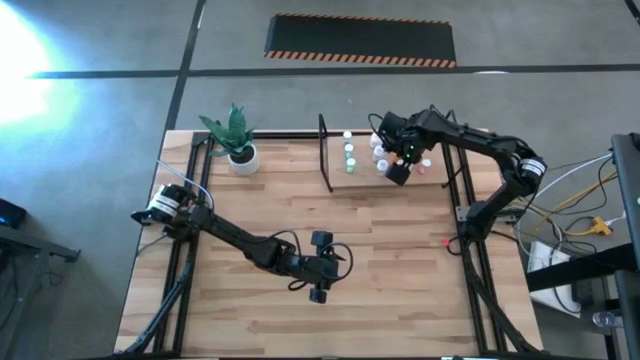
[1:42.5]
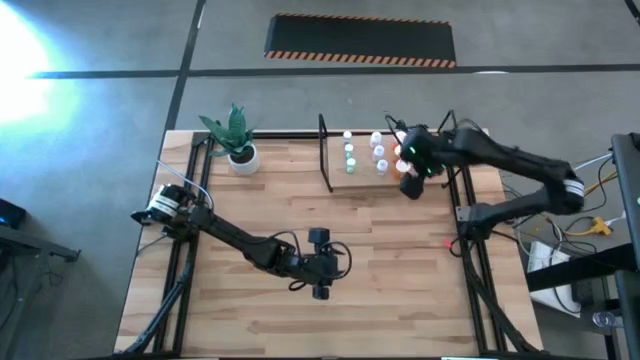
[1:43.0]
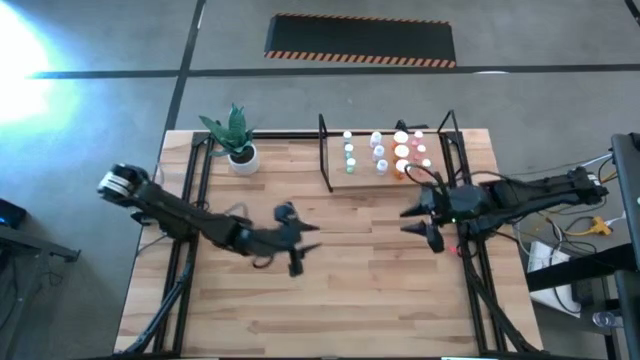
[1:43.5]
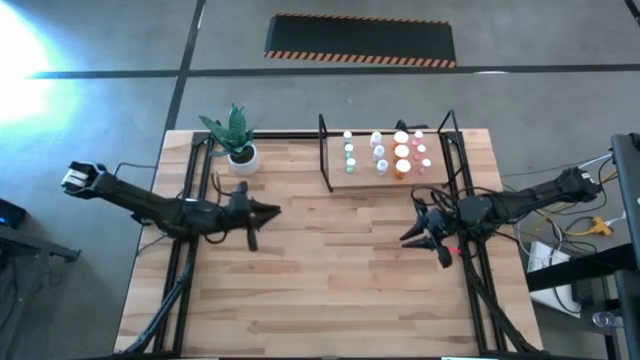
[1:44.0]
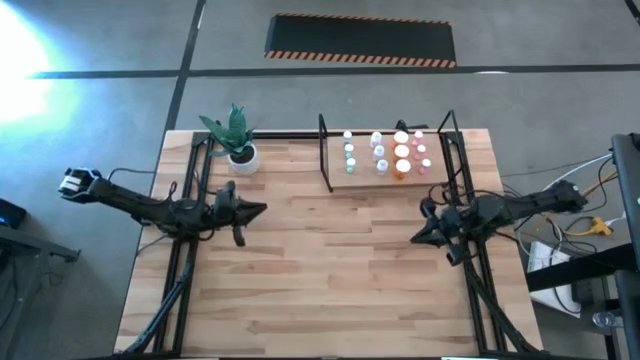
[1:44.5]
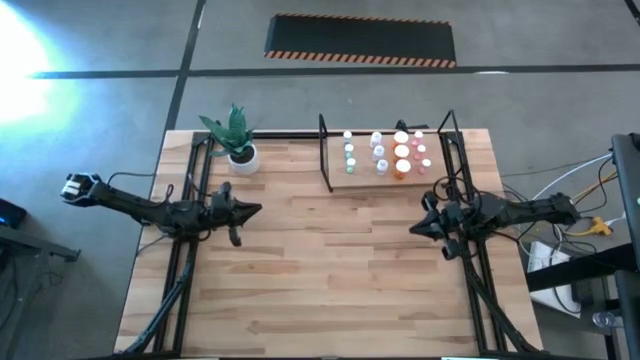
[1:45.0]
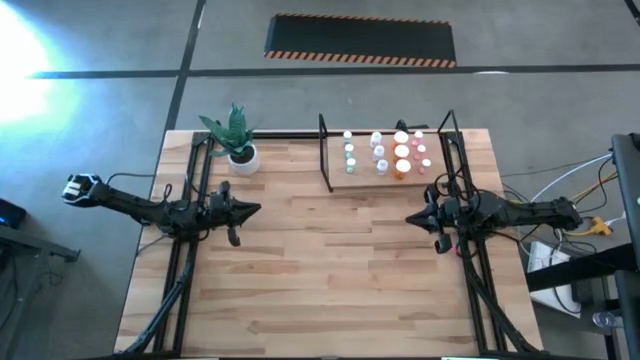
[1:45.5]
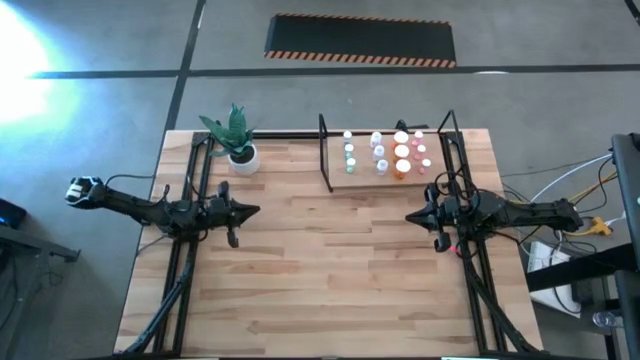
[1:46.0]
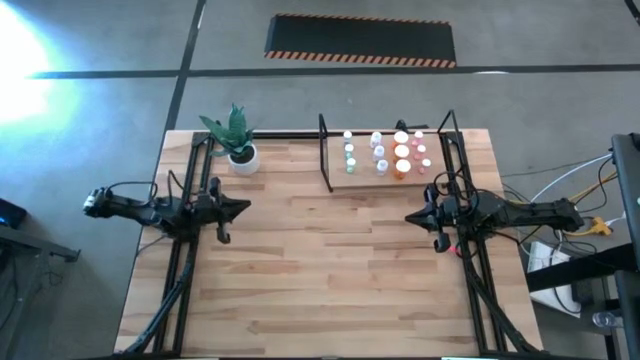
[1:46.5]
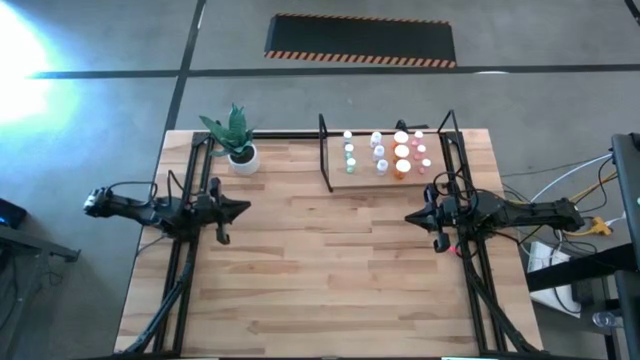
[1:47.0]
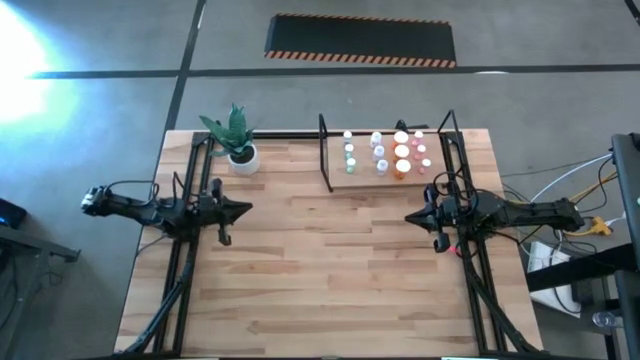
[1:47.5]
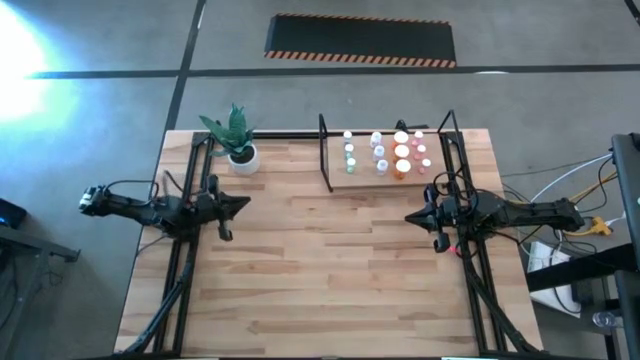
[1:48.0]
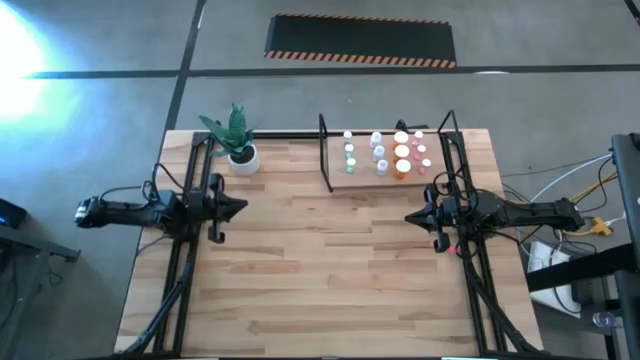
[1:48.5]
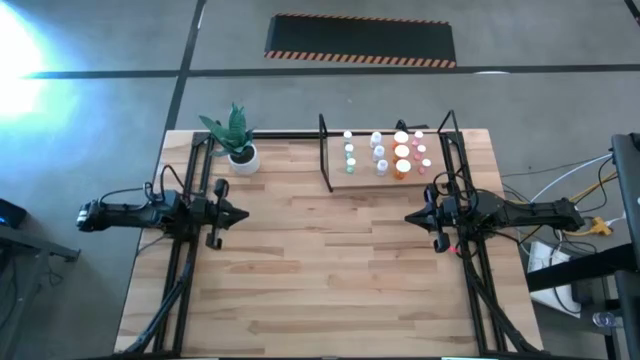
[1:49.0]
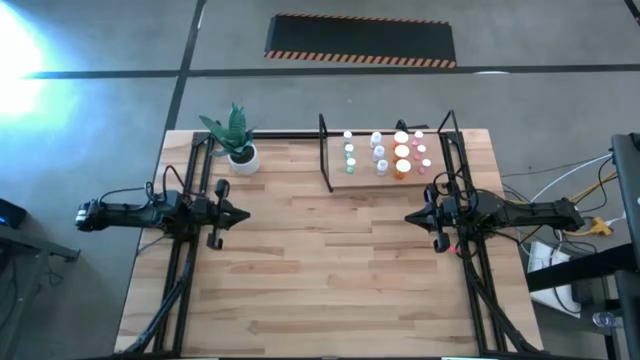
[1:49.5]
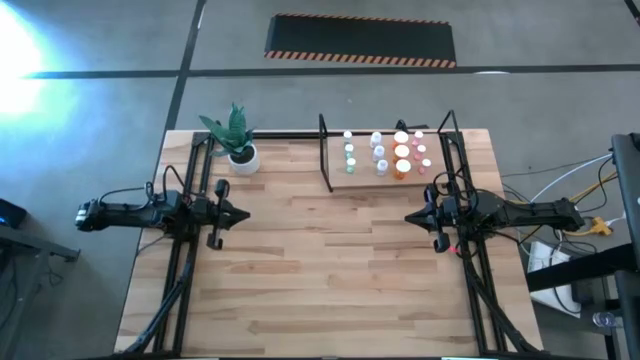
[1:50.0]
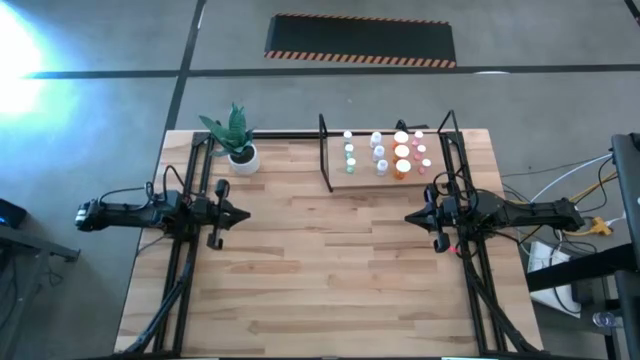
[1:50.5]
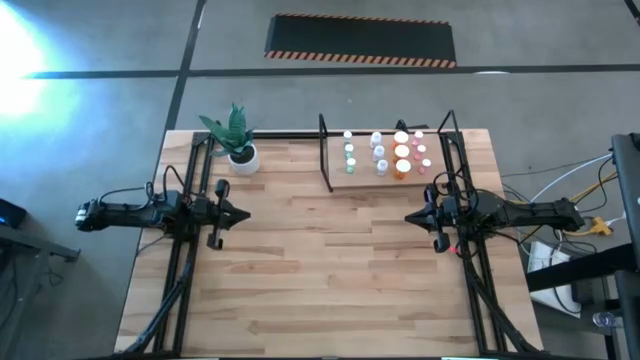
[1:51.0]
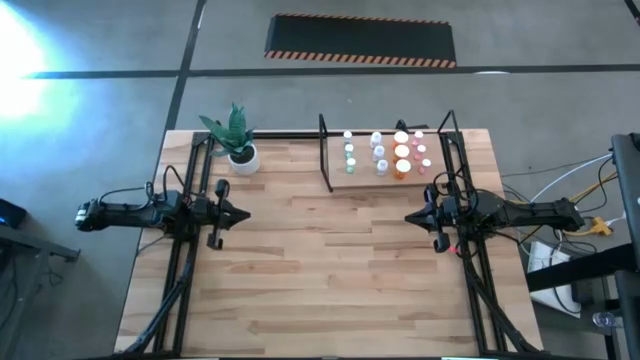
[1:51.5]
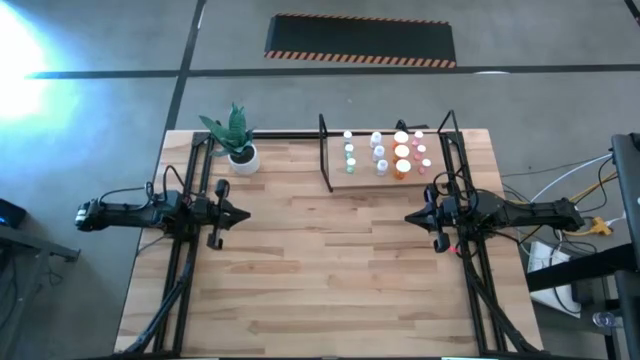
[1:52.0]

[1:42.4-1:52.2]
Task: Pick and place medicine bottles onto shelf by color
Return to Home Position

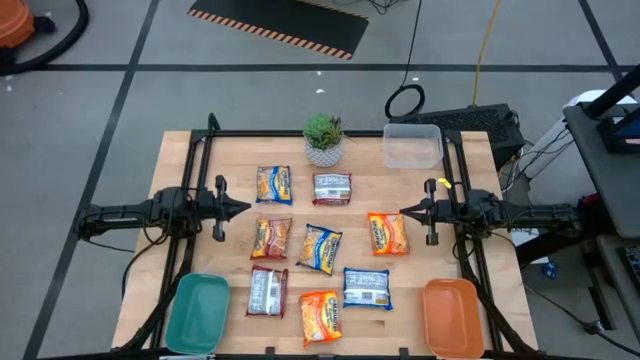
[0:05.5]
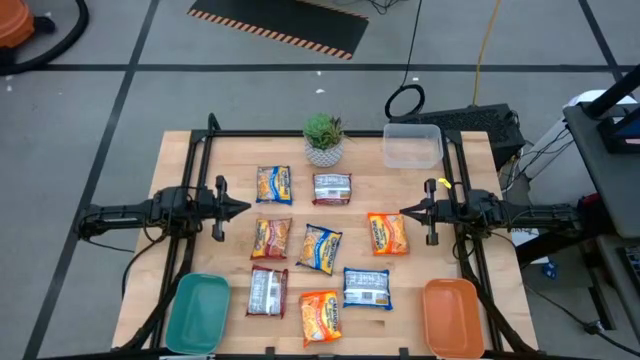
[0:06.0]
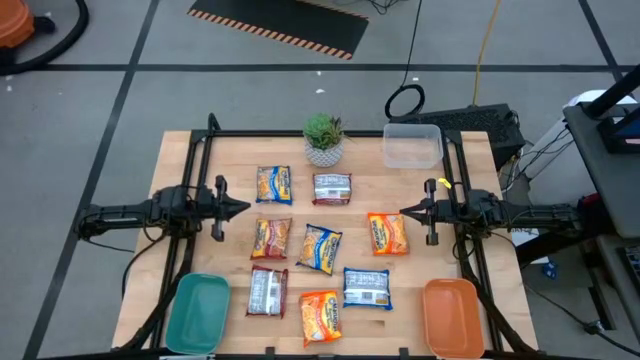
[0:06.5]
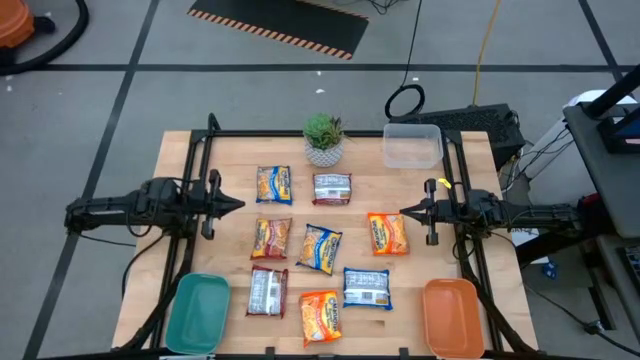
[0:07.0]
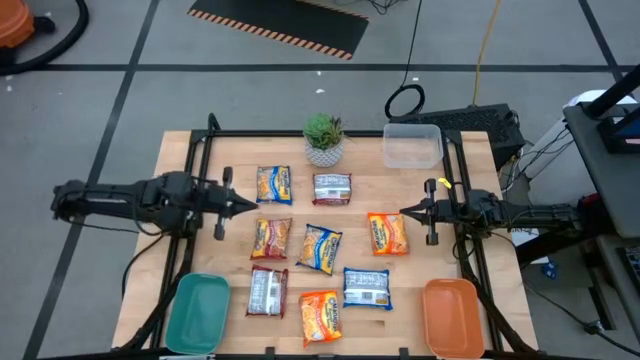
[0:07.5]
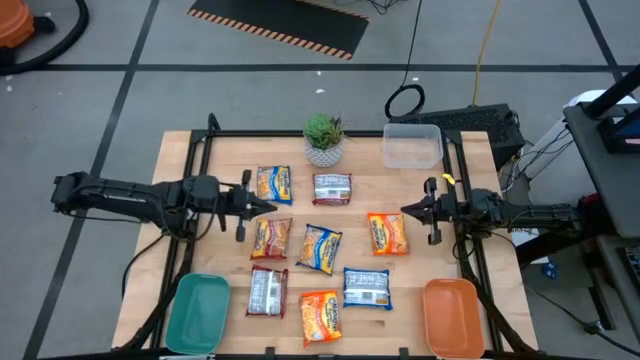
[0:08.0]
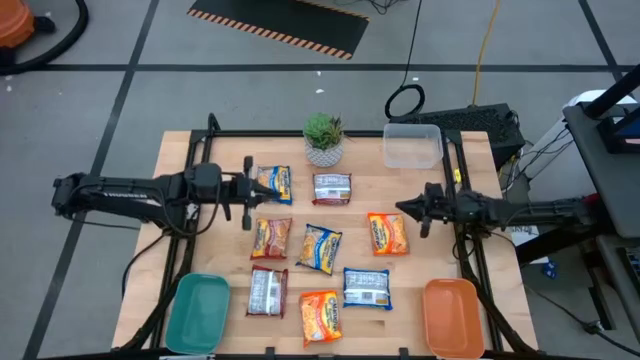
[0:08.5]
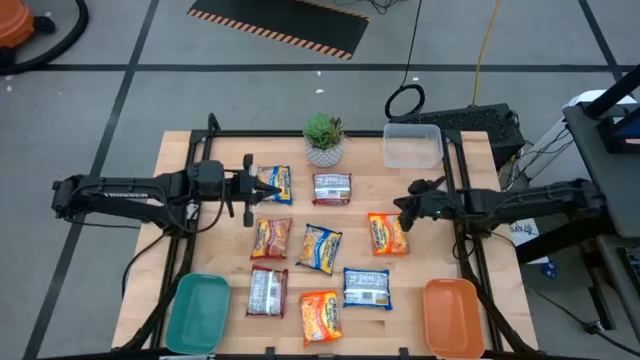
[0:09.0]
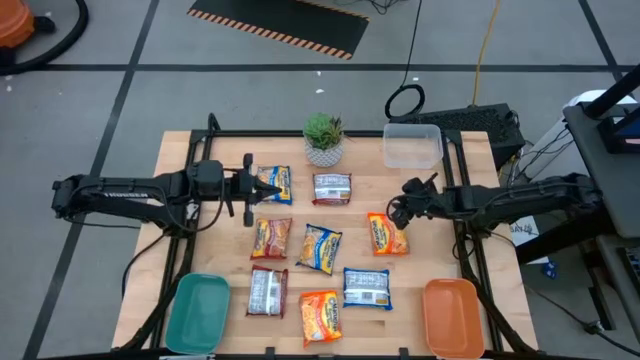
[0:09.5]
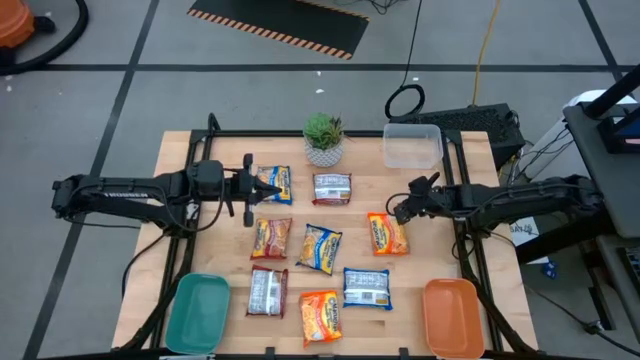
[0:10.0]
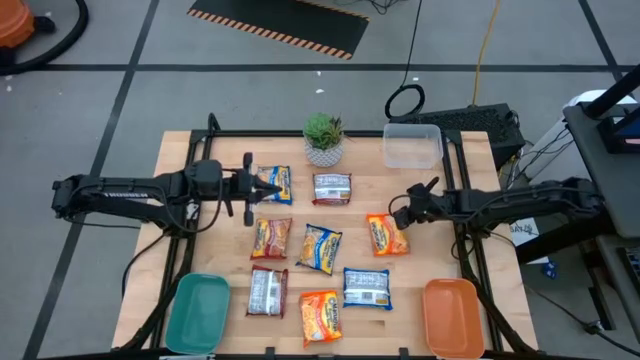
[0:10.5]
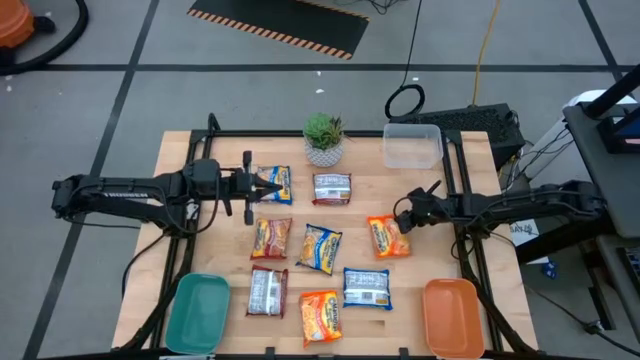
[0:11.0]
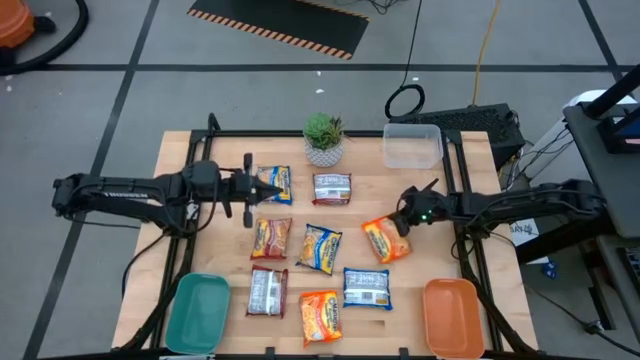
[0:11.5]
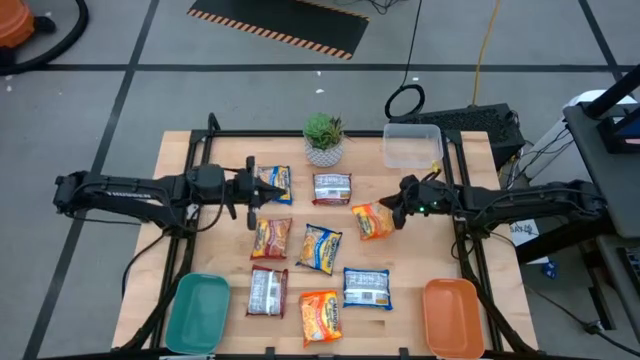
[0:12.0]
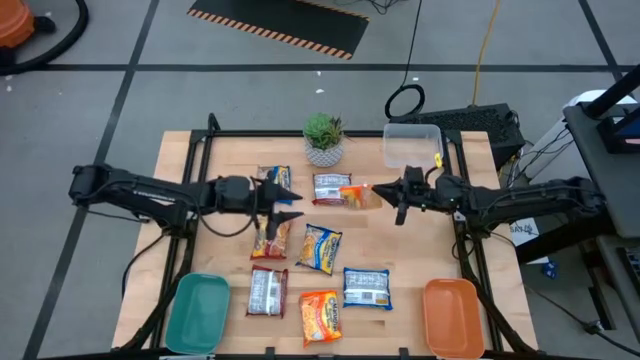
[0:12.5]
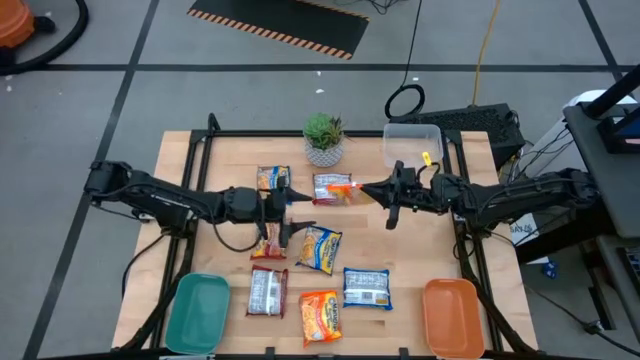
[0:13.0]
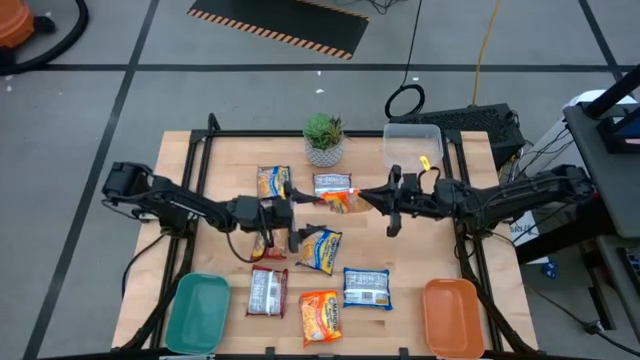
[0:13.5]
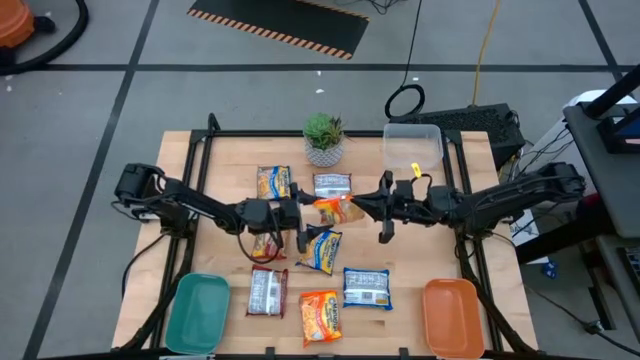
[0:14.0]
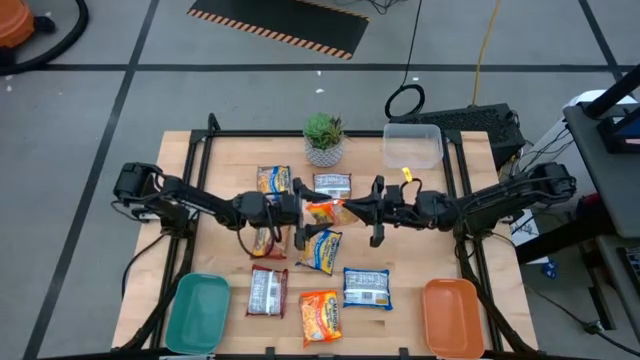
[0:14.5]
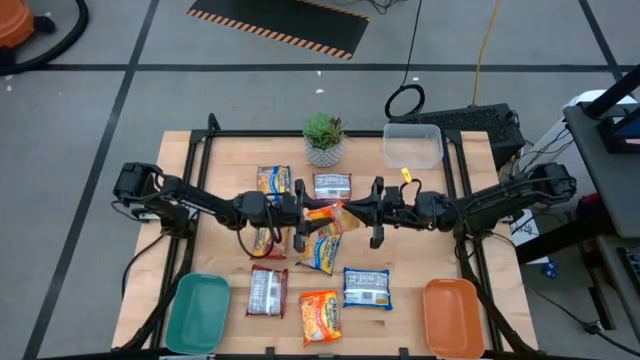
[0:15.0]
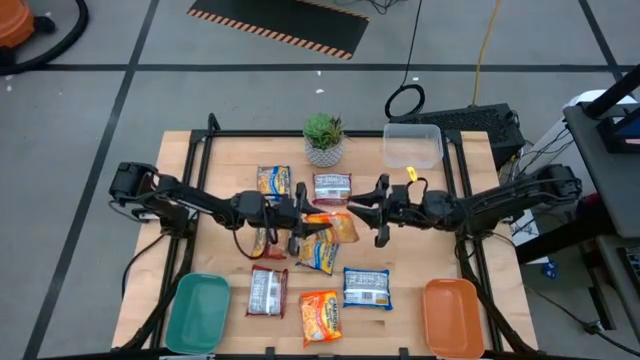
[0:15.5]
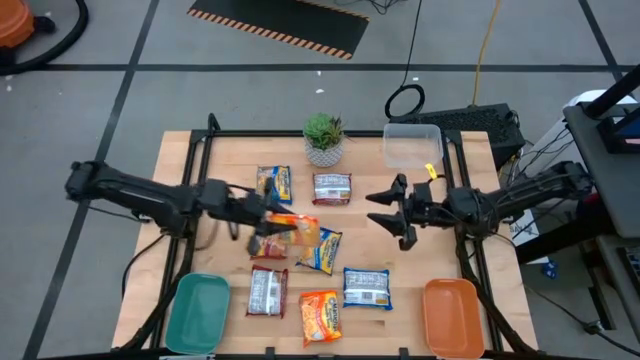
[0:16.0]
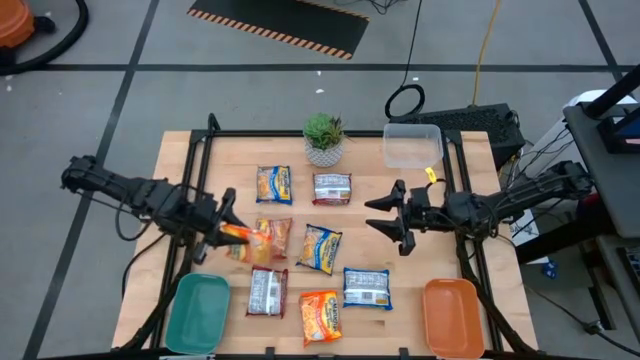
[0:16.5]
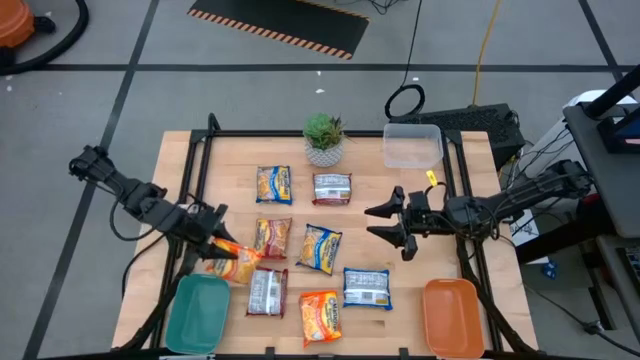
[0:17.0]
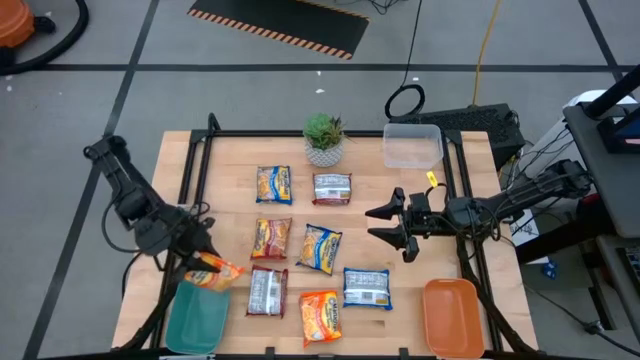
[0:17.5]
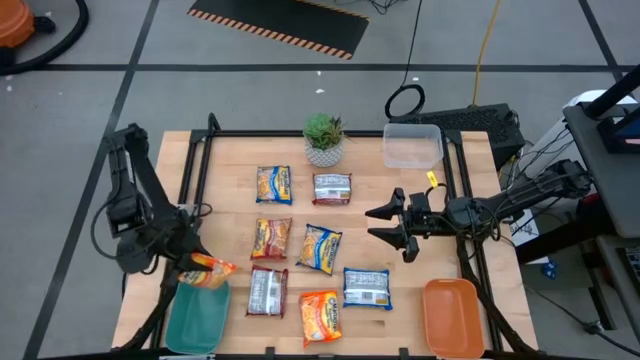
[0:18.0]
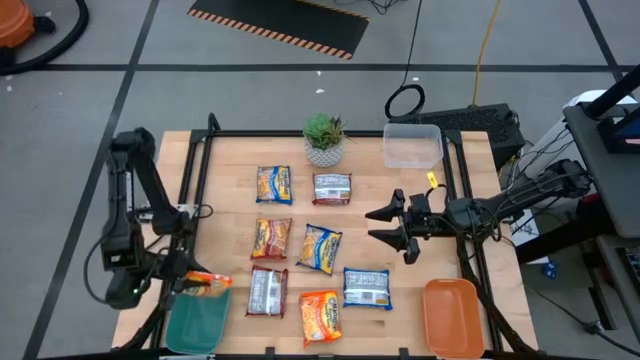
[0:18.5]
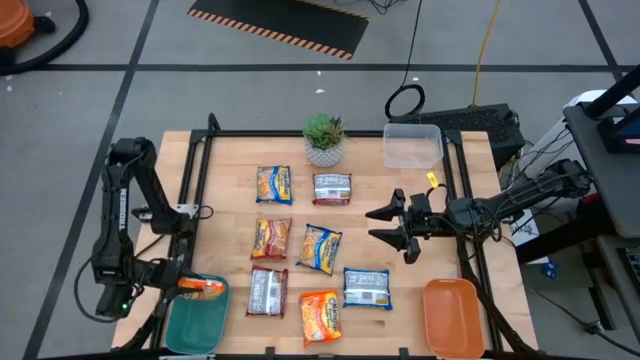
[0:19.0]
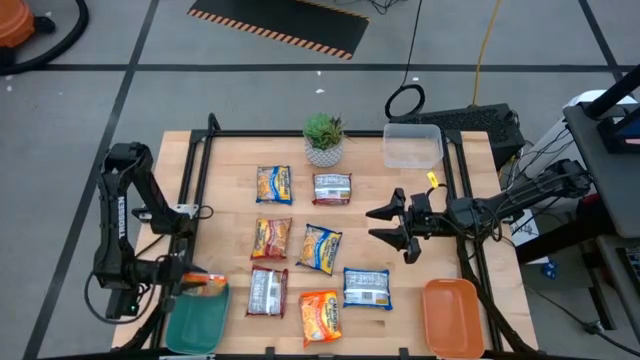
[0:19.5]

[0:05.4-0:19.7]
Task: Sort Maruchan noodles
Put the top orange noodle pack into the green bin
